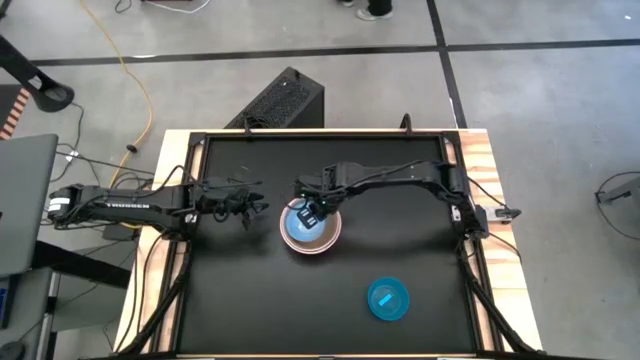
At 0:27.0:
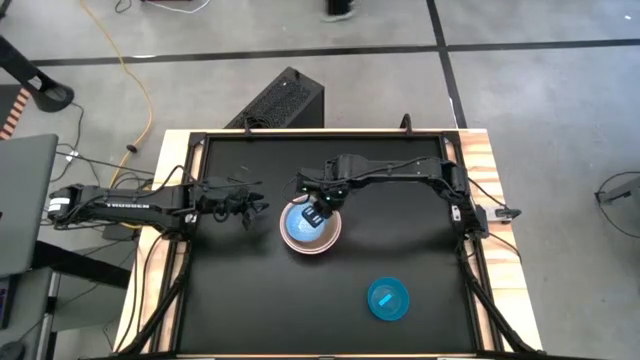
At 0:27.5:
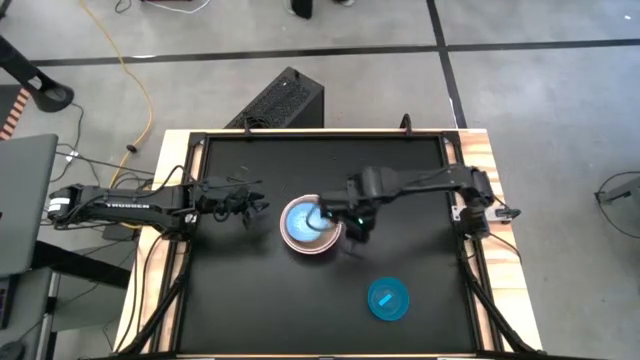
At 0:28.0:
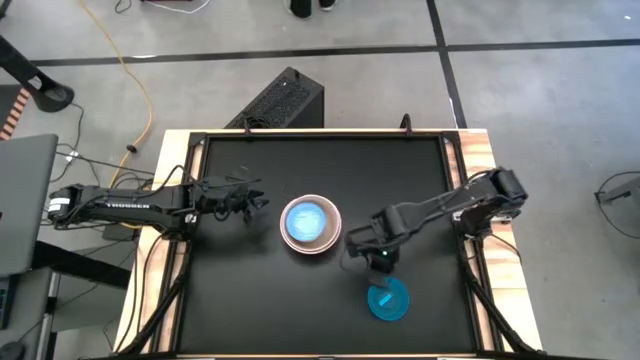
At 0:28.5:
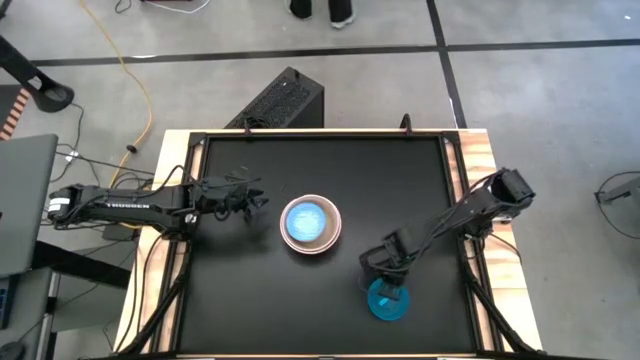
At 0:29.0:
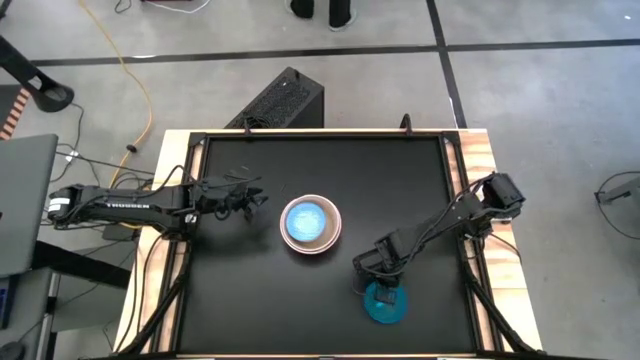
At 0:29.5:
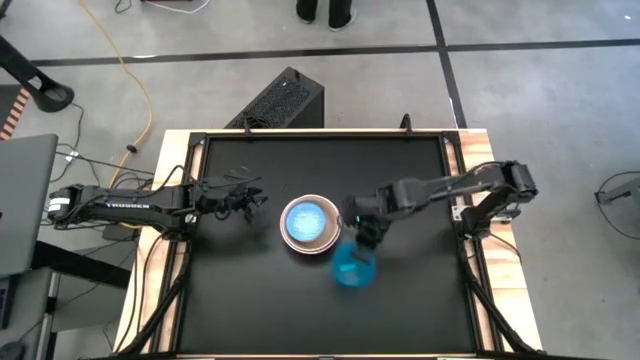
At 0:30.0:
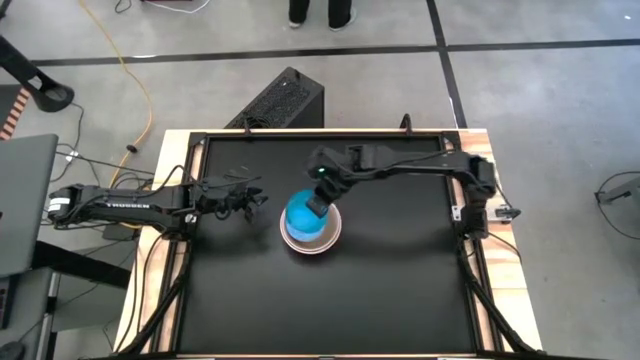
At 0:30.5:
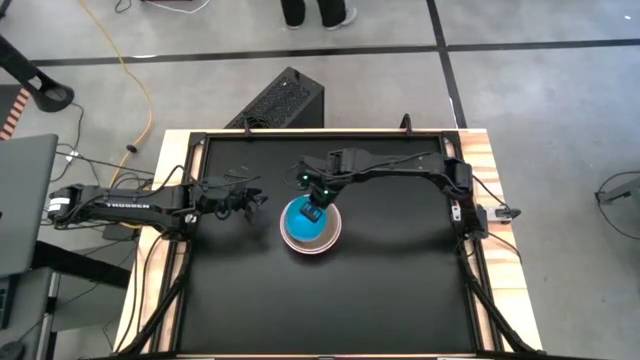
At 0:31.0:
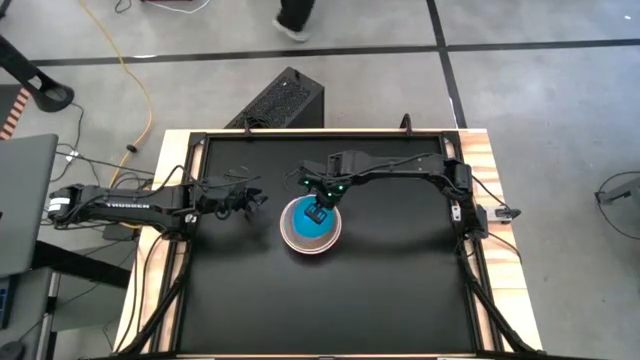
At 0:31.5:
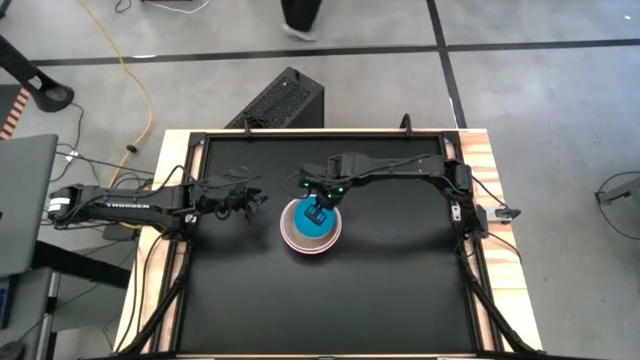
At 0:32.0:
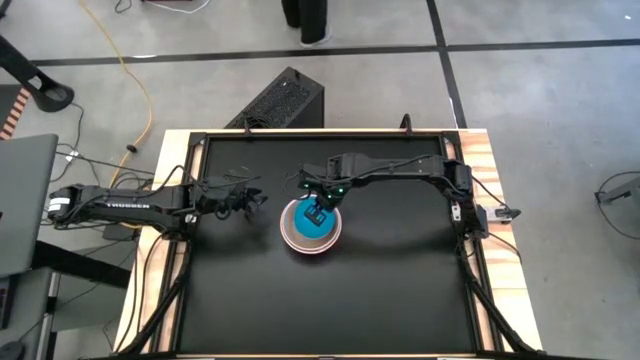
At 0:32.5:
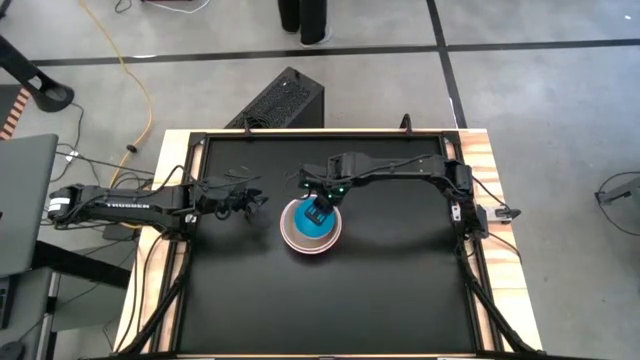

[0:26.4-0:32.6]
Stack the light blue bowl on the blue bowl

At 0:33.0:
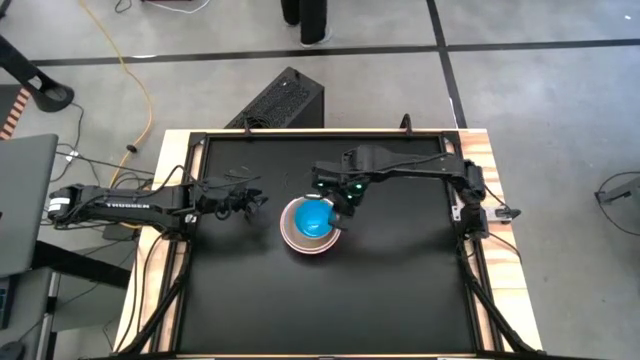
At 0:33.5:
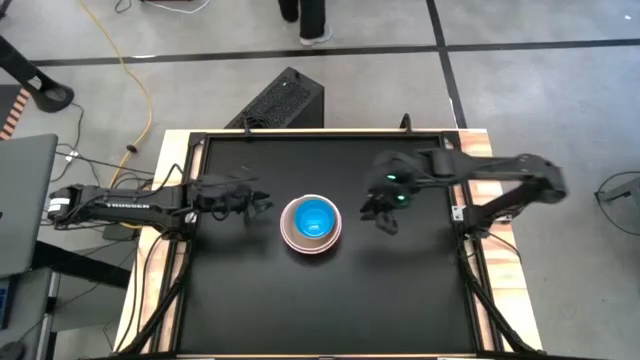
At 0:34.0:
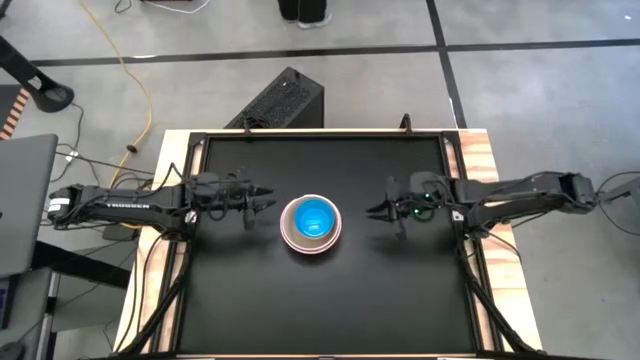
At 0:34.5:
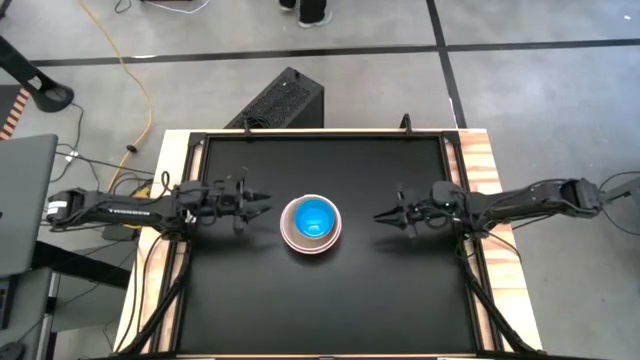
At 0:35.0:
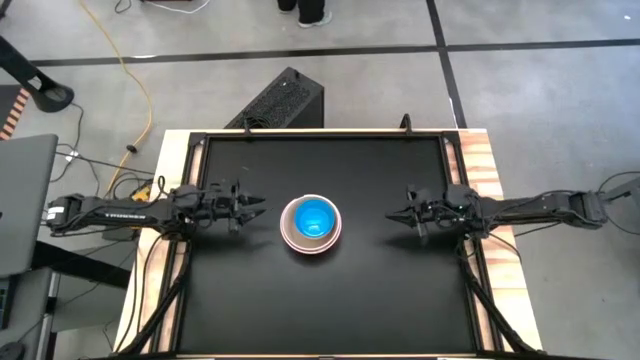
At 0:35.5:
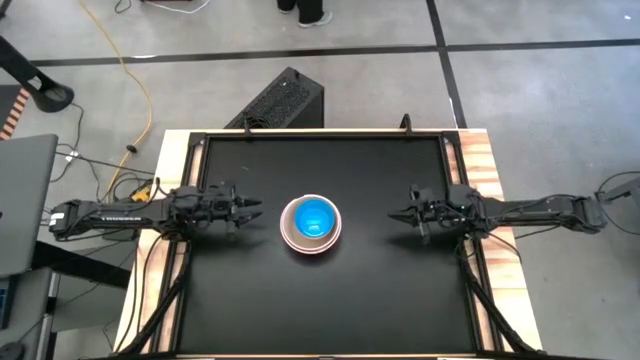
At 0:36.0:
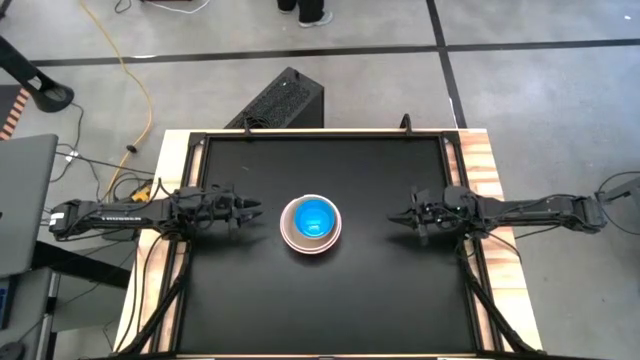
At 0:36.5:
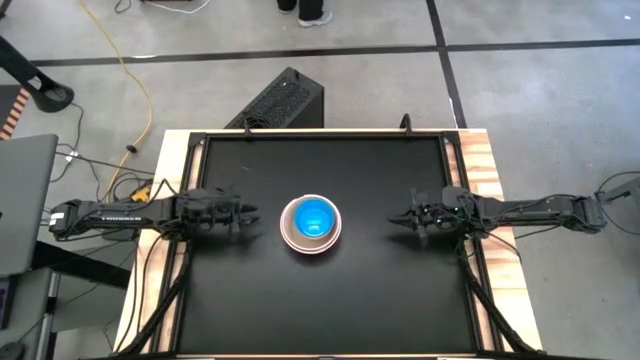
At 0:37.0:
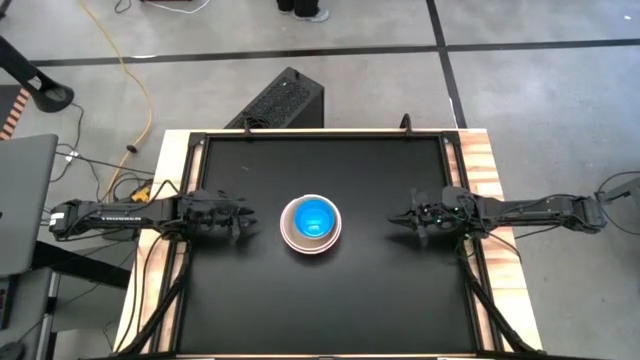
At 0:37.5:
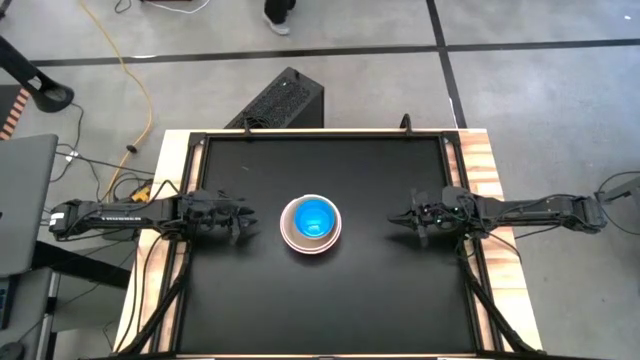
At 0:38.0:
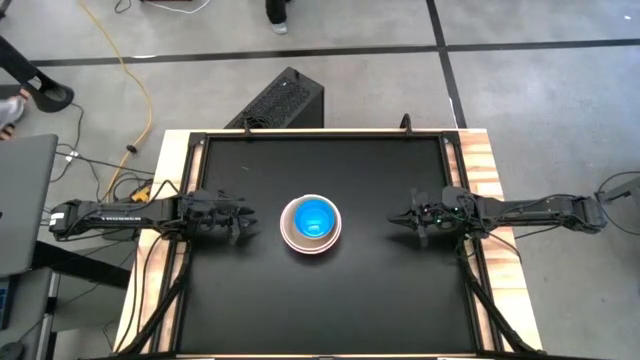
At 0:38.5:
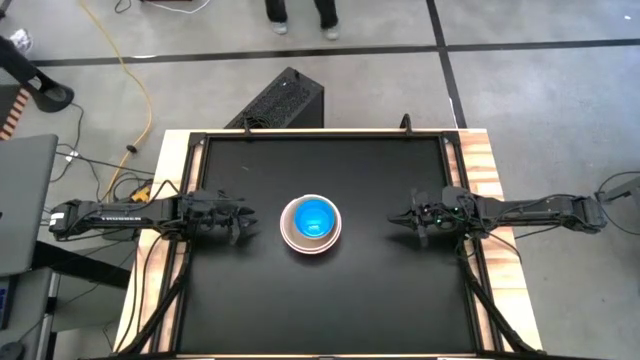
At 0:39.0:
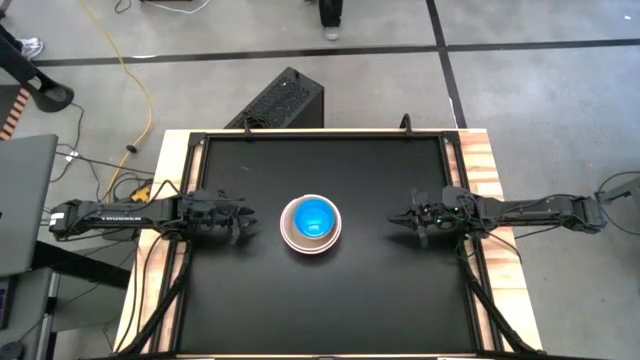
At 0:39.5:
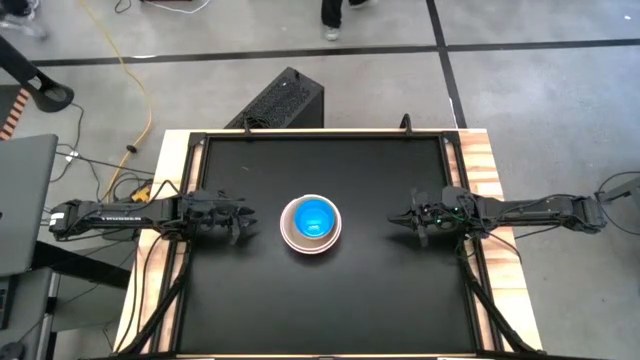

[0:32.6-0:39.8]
Return to Home Position

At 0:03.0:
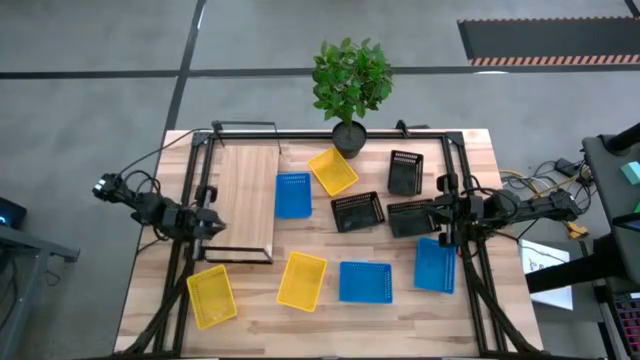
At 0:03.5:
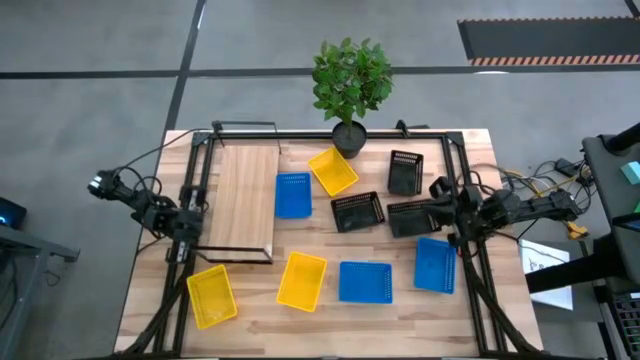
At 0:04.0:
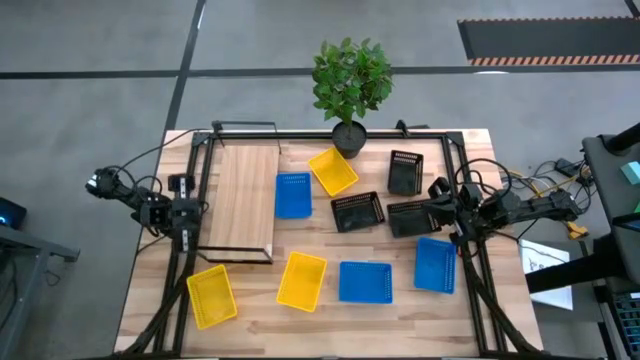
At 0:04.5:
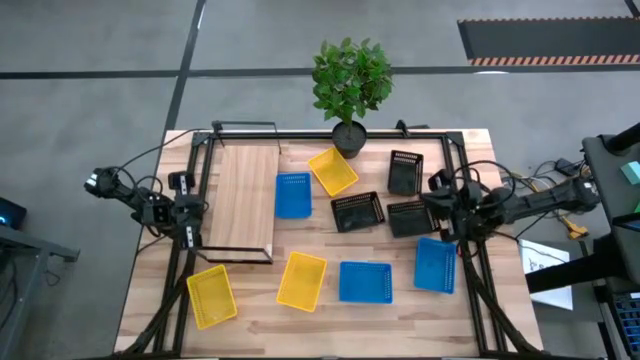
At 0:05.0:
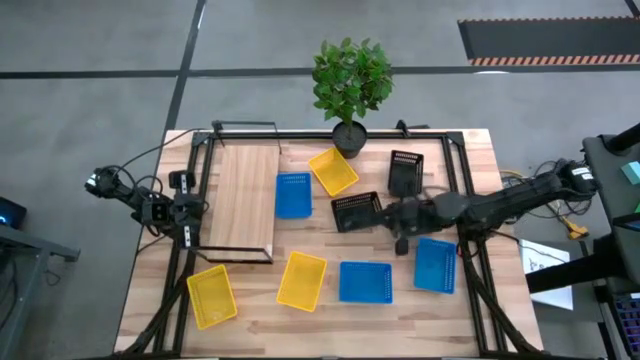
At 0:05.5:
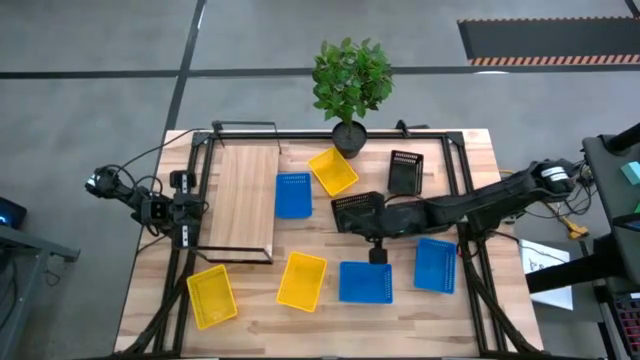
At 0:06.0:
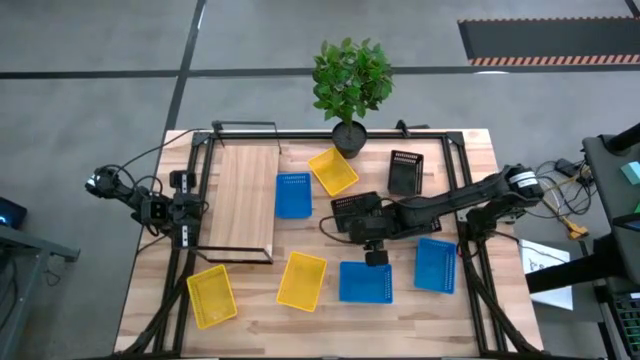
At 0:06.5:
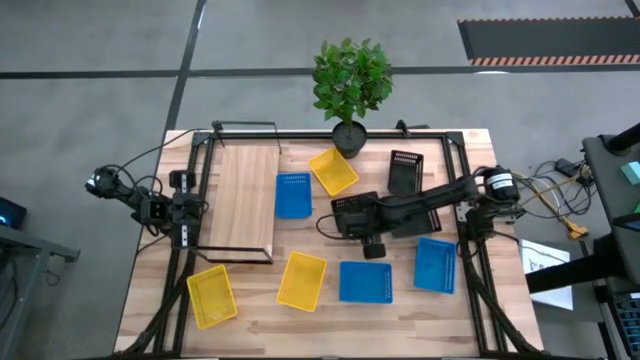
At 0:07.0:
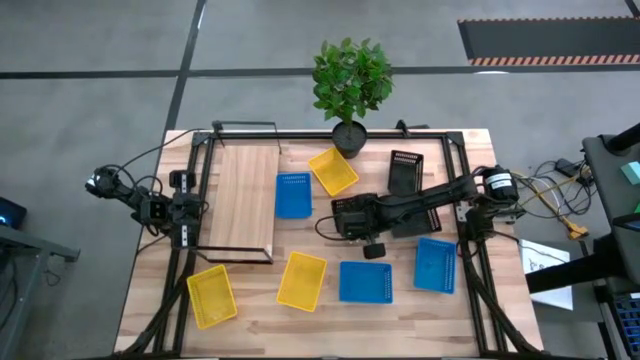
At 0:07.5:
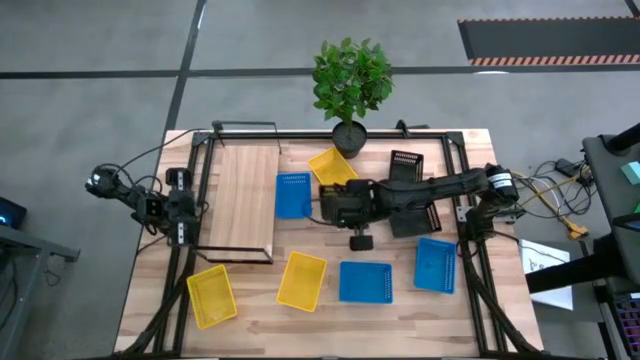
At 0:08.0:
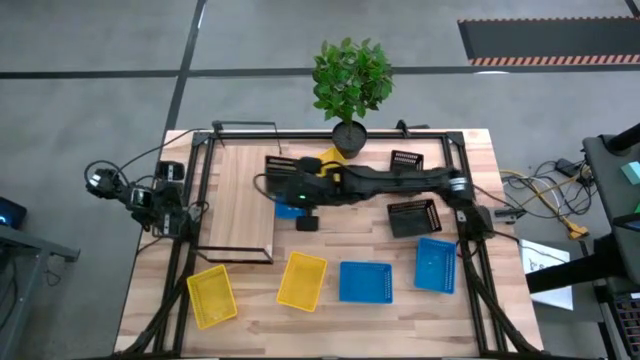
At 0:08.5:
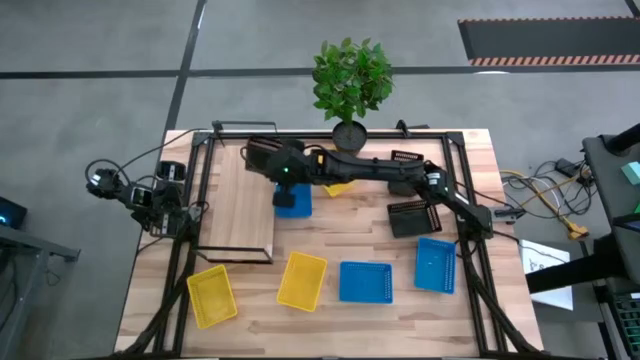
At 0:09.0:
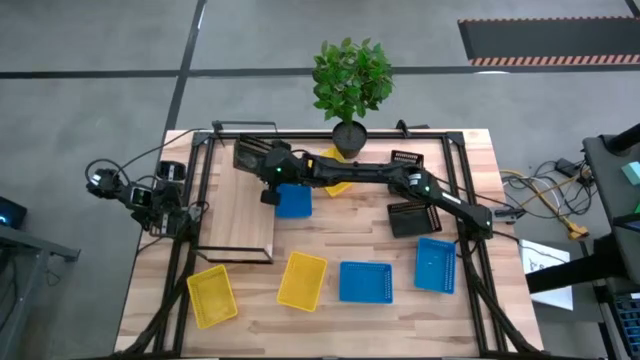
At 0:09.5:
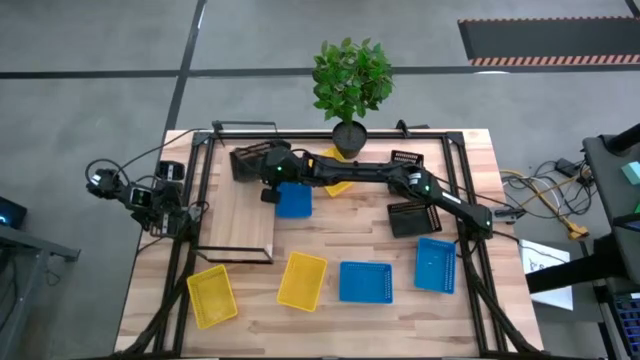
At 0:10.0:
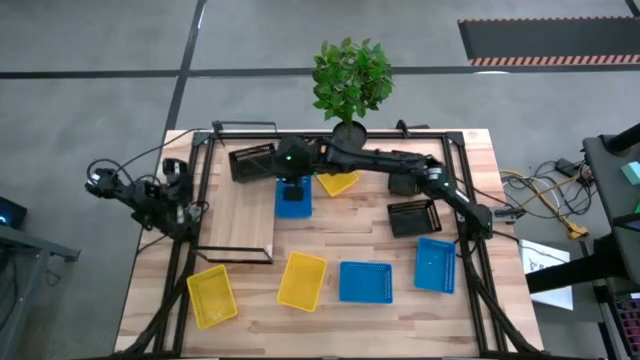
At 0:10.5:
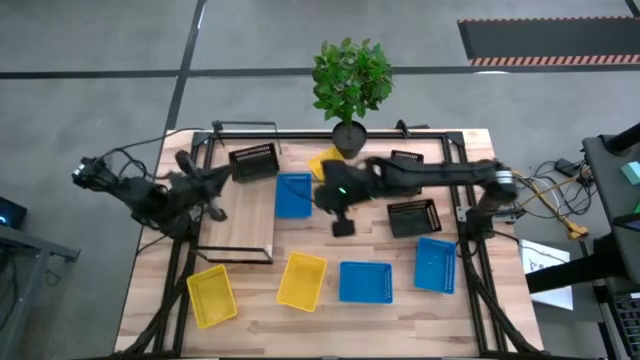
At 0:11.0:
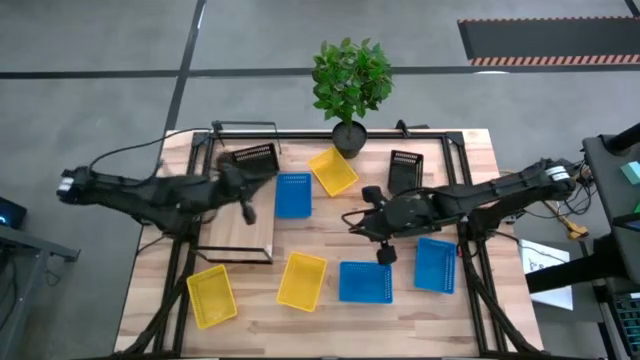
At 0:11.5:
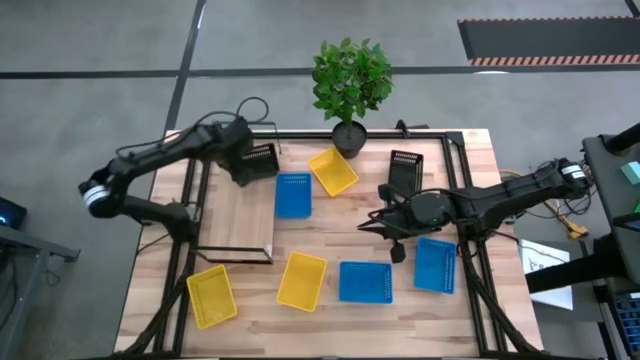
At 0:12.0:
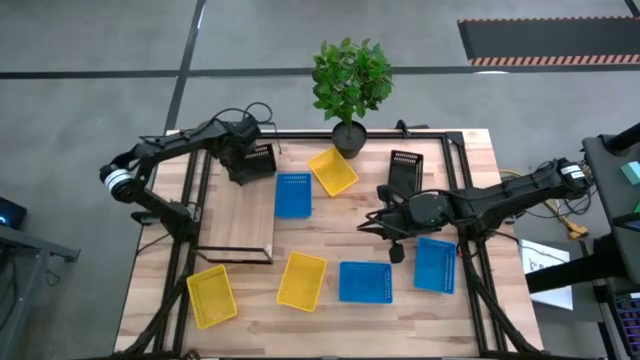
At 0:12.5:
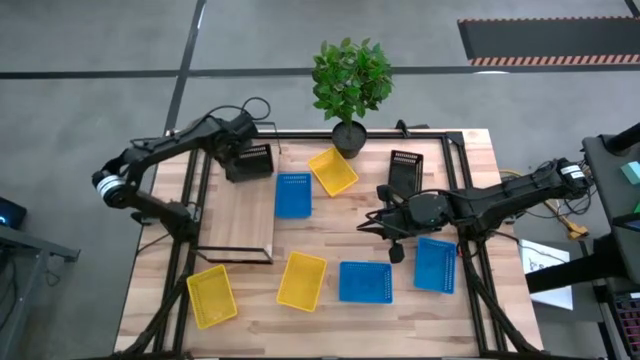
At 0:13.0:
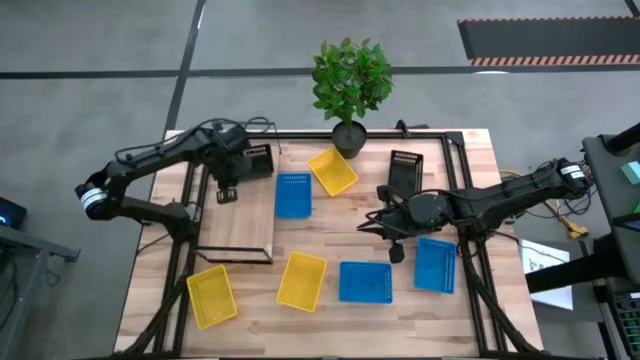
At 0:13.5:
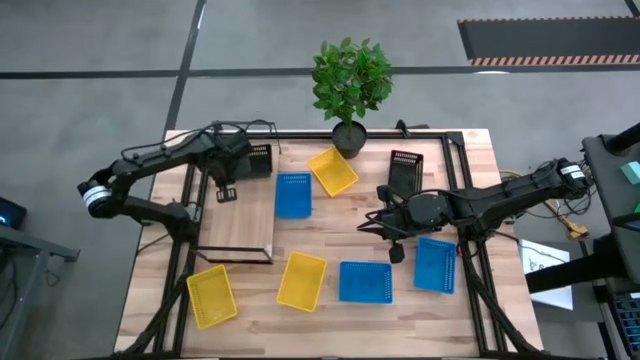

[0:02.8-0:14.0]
Put the bottom left black basket on the shelf
